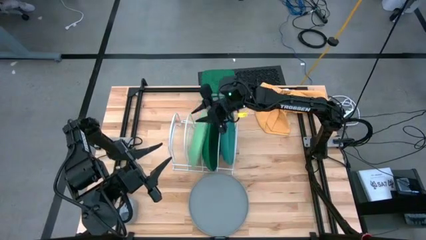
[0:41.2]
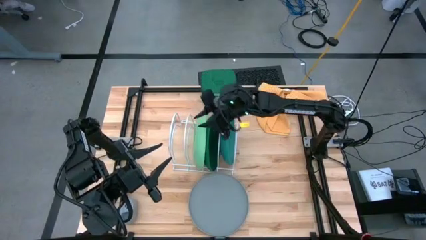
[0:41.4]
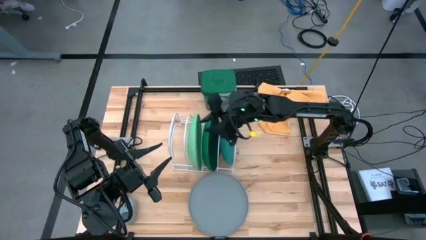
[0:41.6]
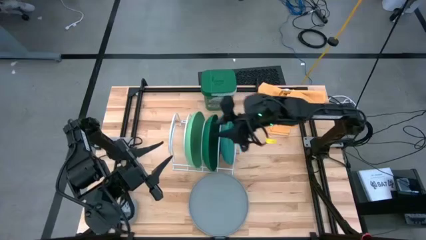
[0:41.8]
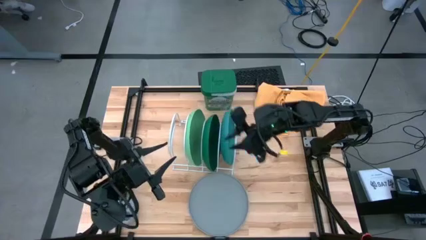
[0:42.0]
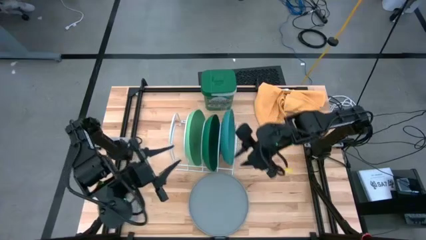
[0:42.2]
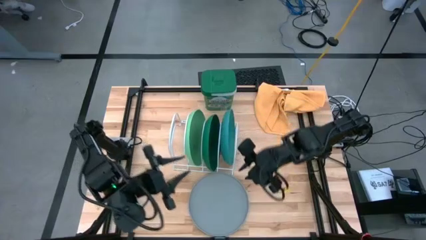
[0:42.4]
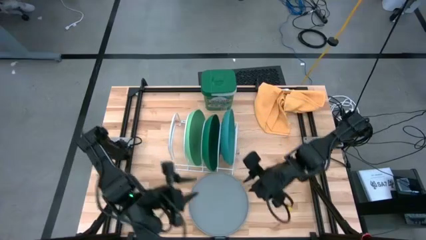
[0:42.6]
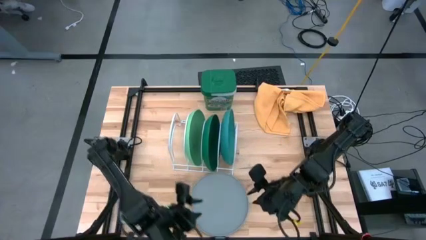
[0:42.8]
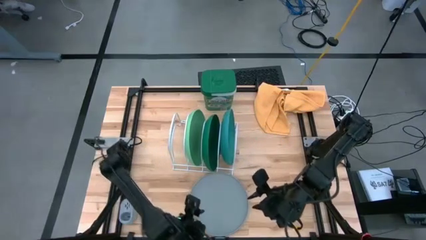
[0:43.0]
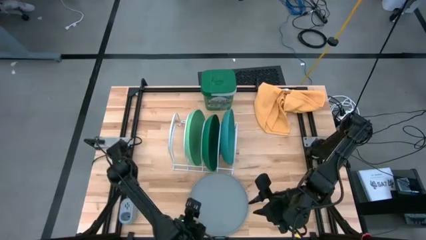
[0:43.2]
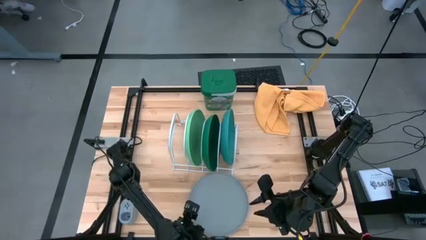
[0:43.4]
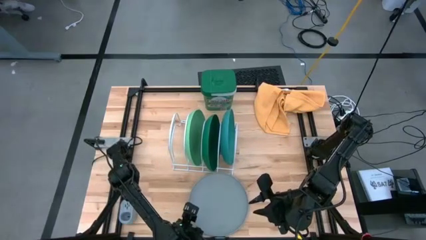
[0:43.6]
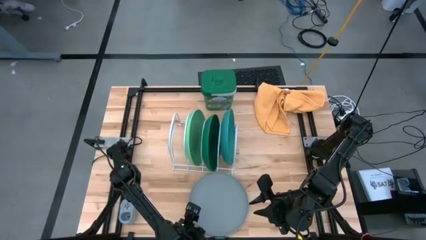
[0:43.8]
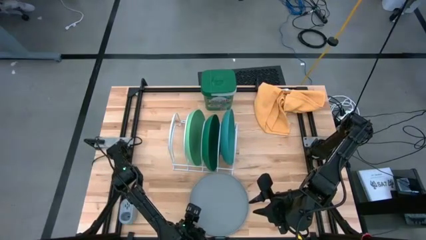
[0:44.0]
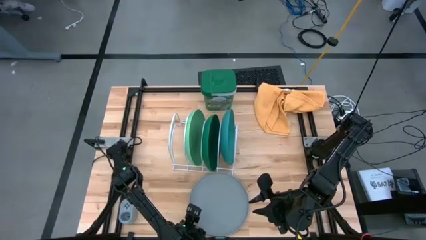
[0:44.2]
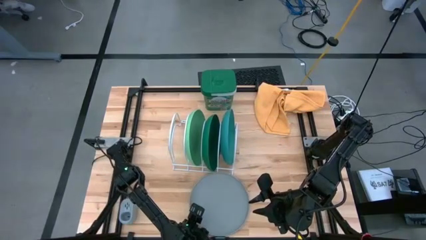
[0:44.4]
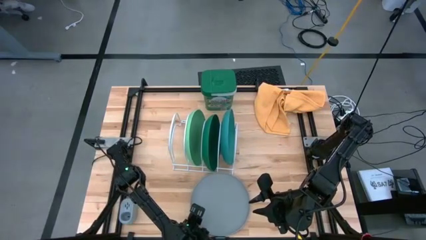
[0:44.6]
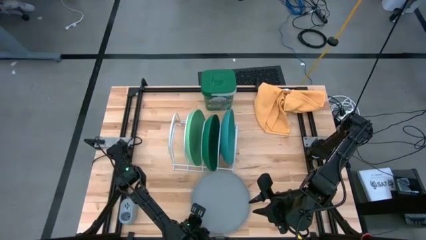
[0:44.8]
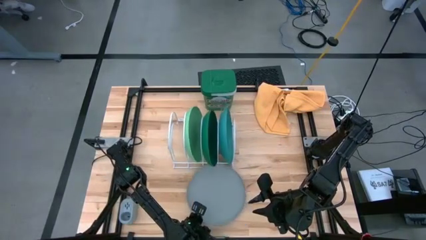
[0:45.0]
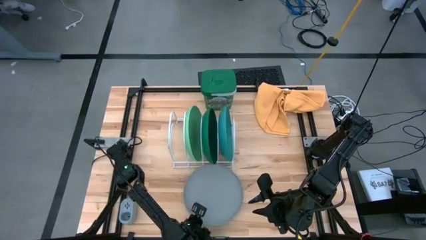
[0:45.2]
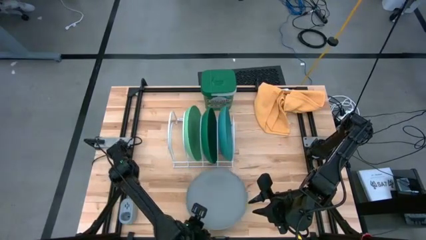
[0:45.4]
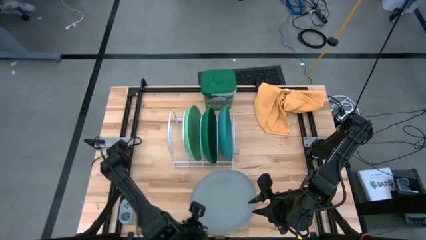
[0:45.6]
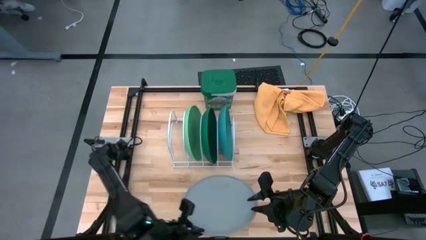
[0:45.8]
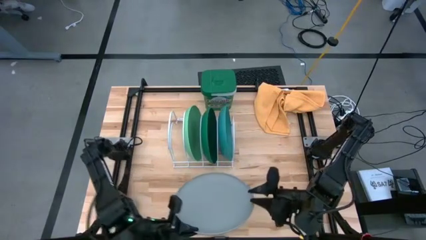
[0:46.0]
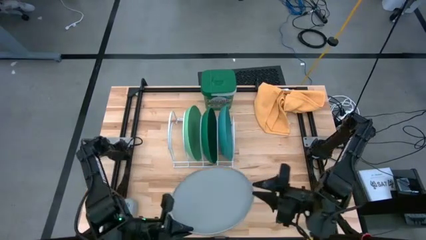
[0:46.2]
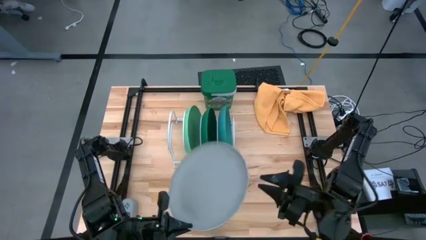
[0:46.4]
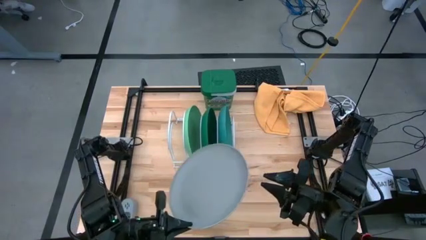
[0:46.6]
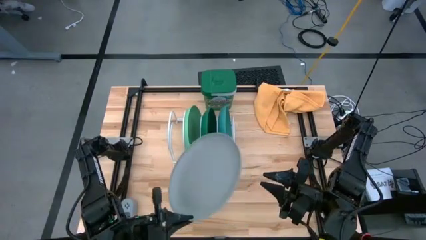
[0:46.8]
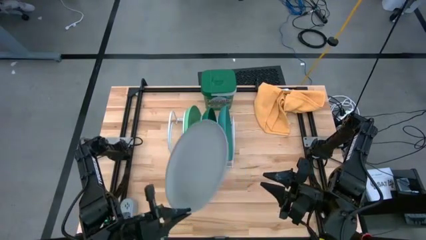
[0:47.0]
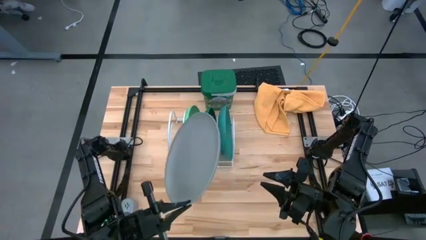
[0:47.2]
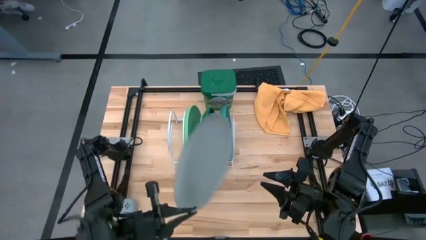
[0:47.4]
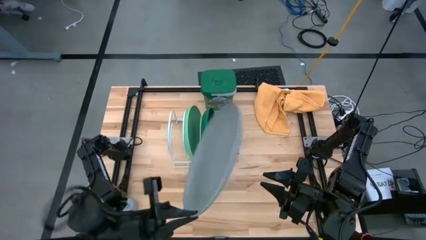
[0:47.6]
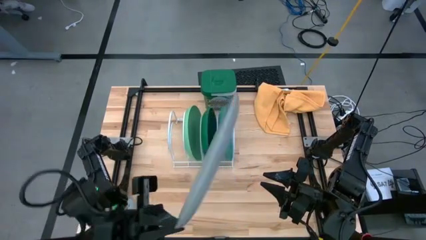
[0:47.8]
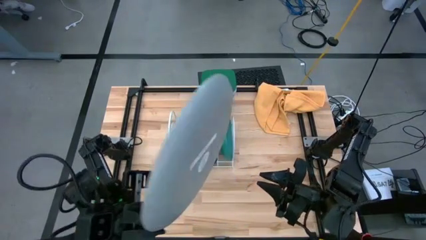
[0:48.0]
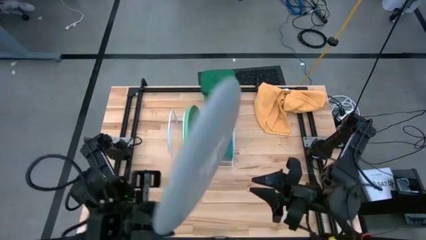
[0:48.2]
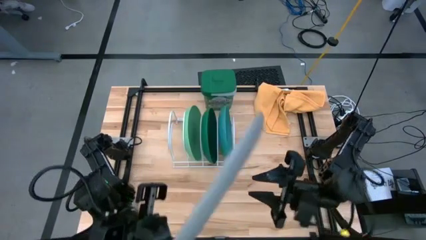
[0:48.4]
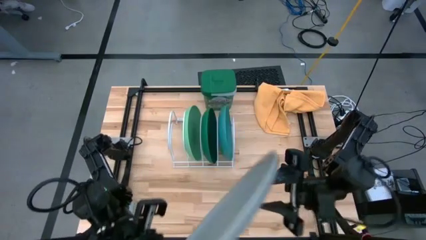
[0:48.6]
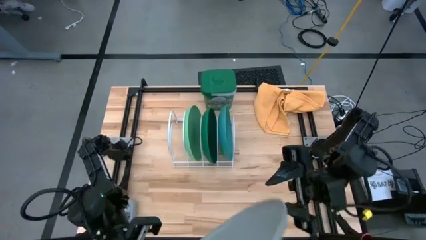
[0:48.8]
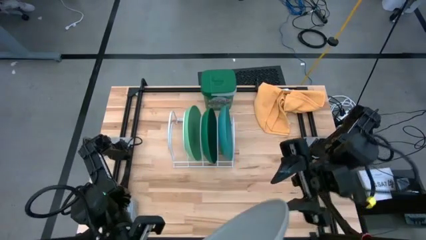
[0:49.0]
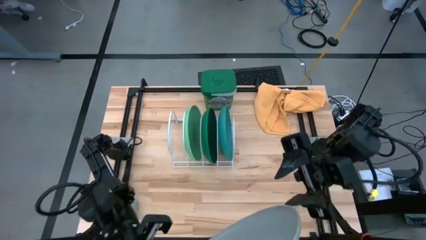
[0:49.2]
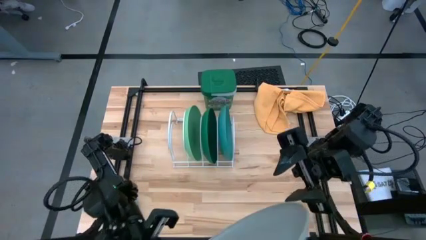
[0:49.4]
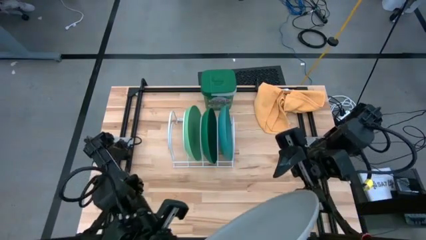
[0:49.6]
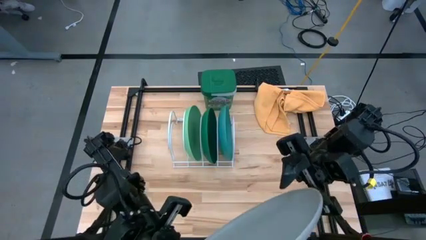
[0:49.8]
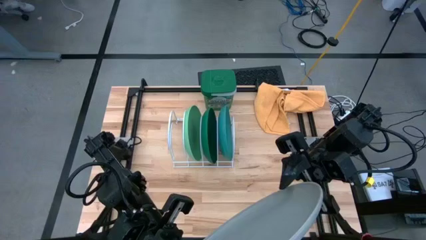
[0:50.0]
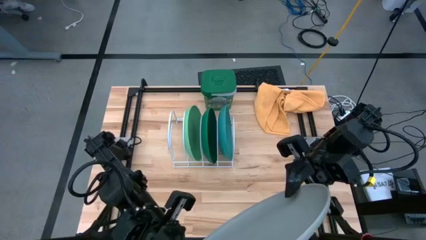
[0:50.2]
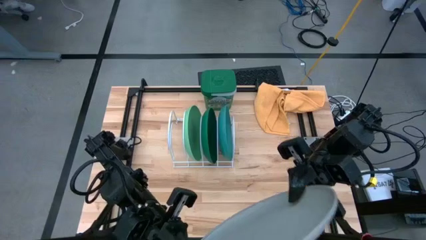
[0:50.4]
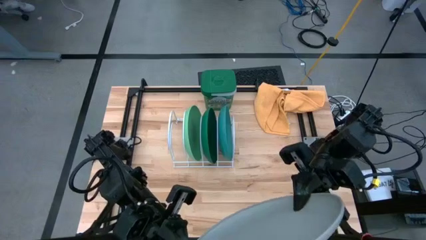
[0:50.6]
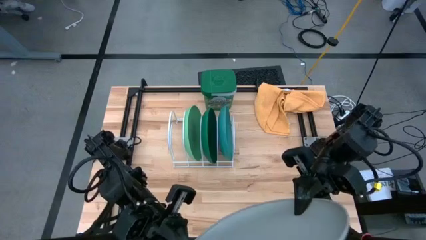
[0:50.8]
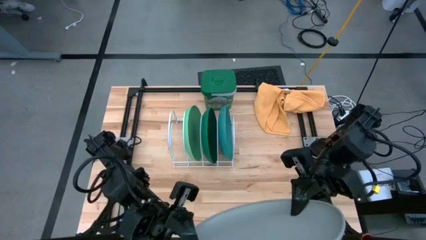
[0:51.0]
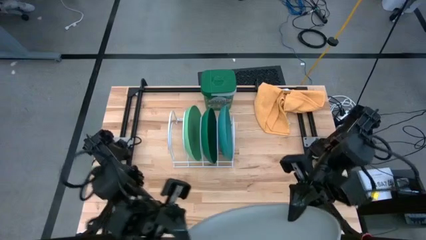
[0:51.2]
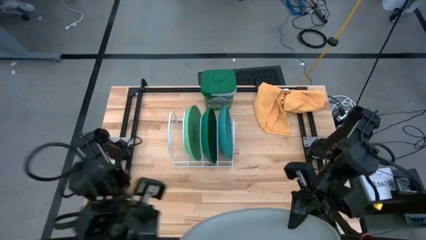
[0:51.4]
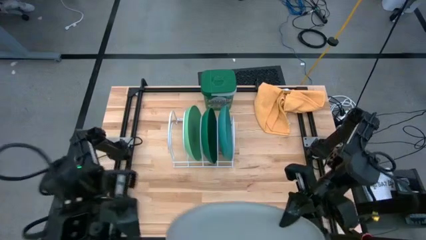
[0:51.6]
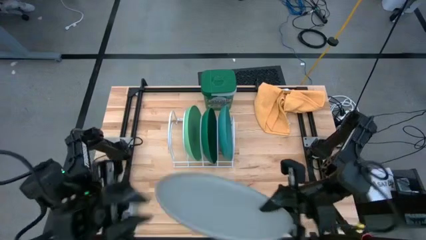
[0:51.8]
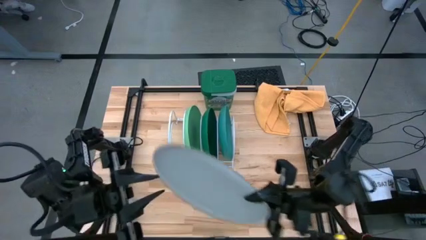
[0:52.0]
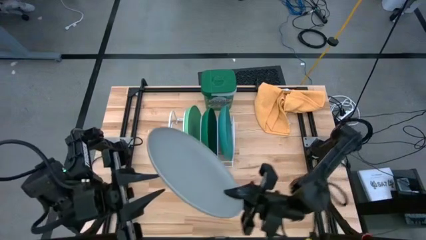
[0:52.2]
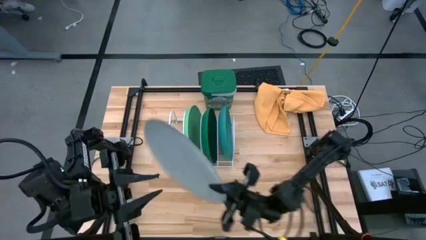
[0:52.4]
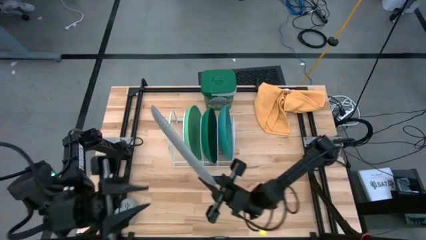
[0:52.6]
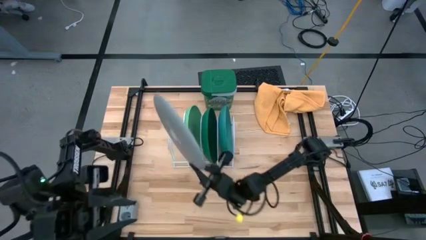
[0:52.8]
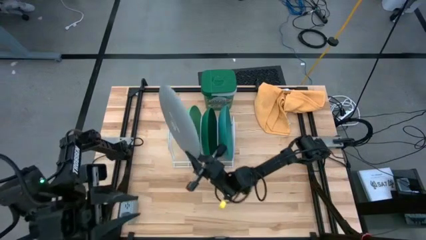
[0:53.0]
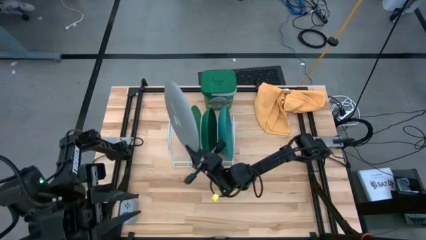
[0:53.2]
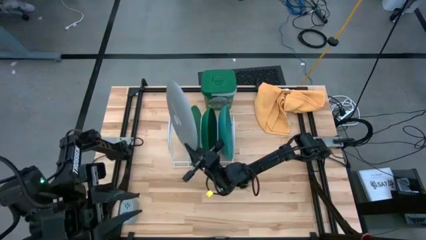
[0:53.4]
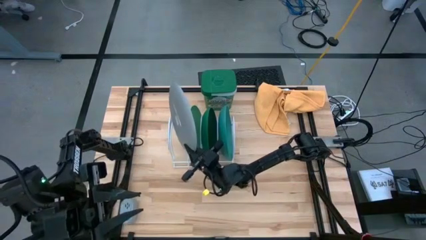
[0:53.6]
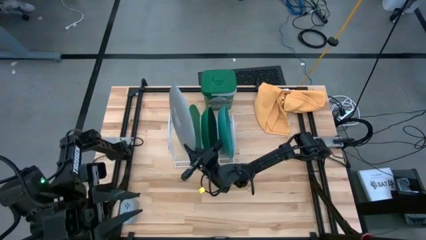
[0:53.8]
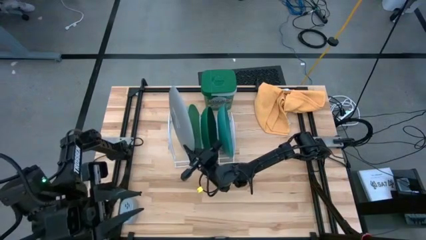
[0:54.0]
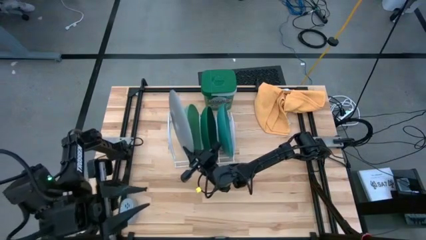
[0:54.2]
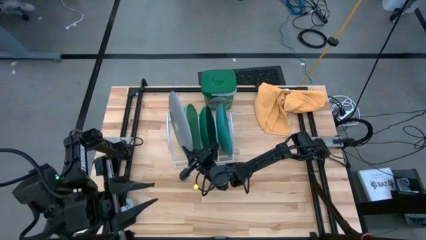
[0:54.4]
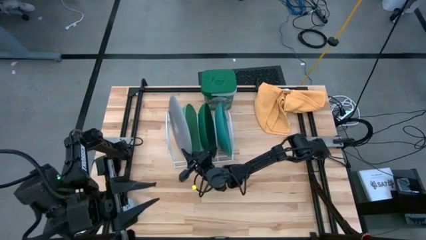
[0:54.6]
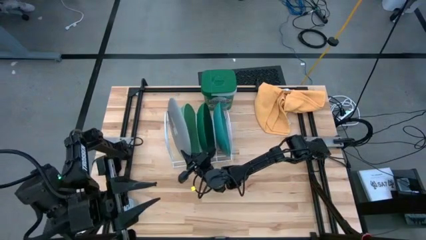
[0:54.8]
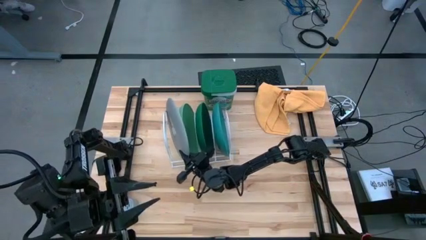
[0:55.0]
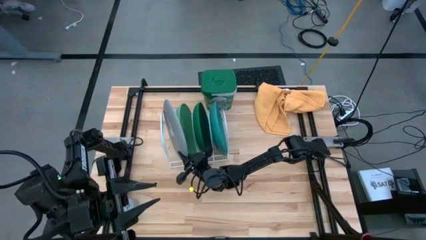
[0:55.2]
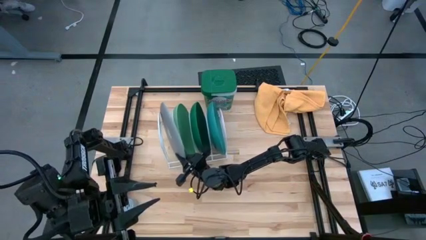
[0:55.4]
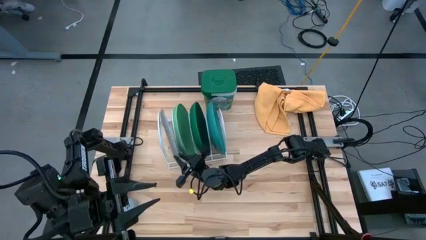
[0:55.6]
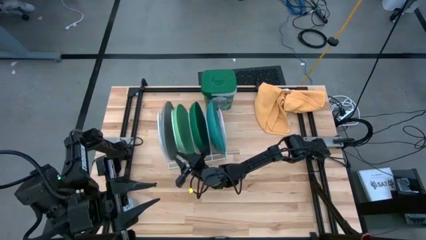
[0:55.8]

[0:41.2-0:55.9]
Task: Sort dishes
Put the gray plate into the dish rack

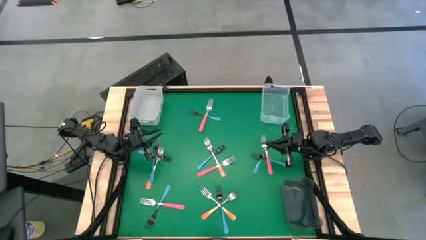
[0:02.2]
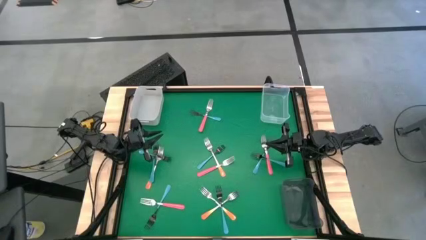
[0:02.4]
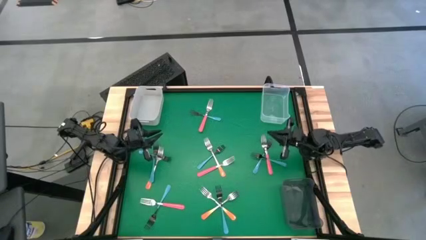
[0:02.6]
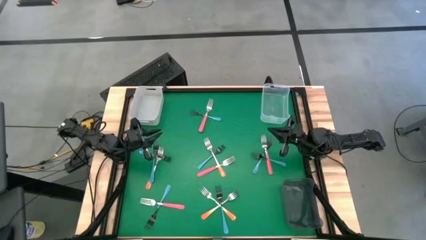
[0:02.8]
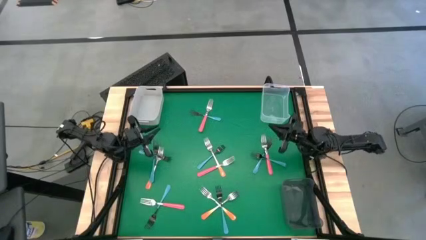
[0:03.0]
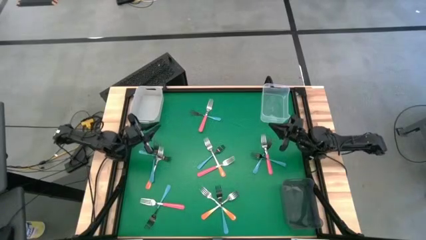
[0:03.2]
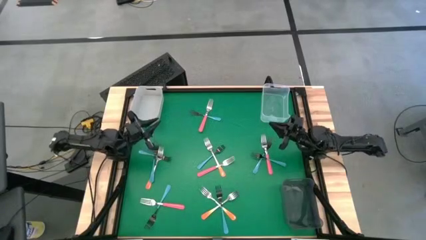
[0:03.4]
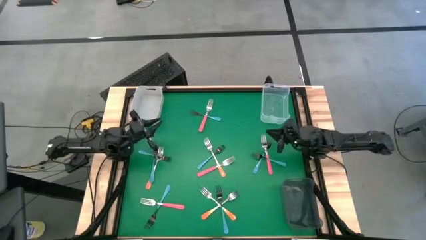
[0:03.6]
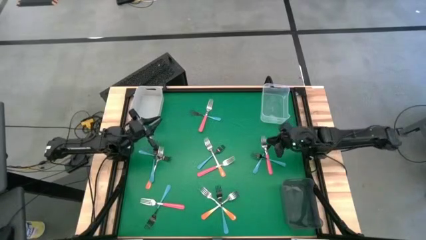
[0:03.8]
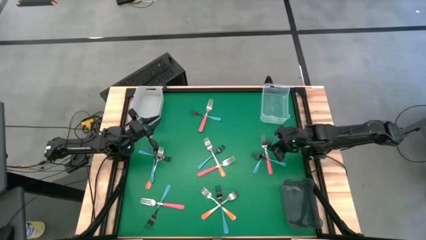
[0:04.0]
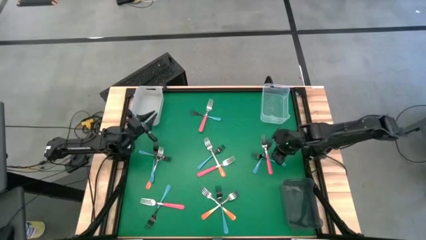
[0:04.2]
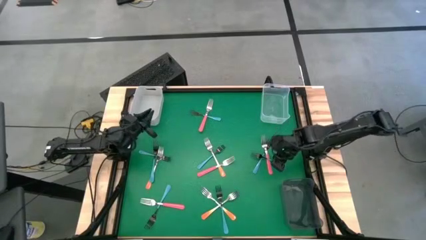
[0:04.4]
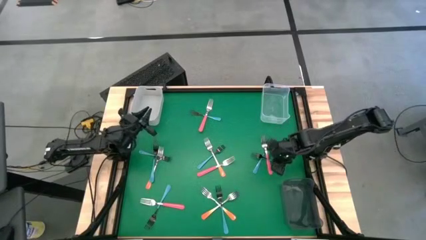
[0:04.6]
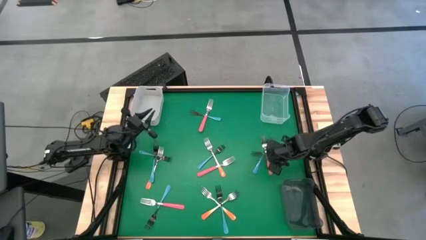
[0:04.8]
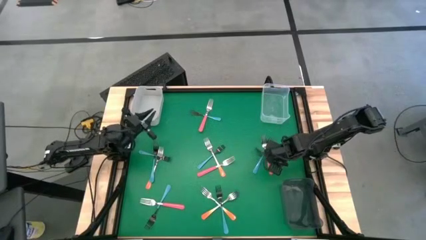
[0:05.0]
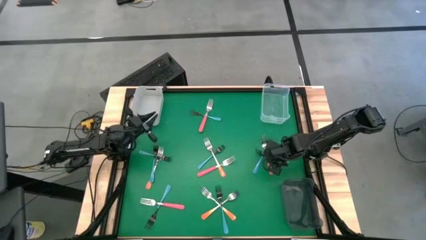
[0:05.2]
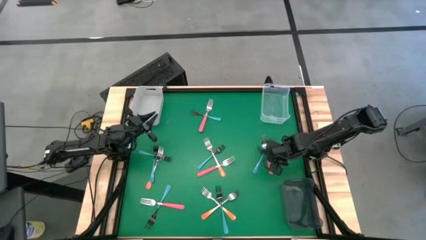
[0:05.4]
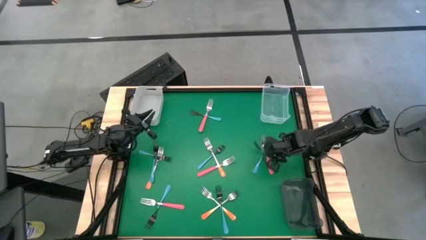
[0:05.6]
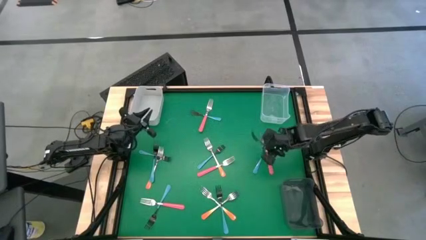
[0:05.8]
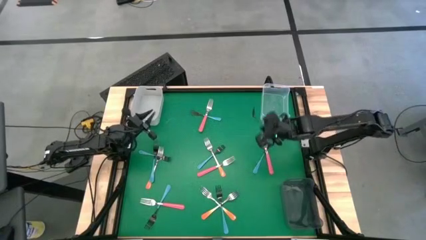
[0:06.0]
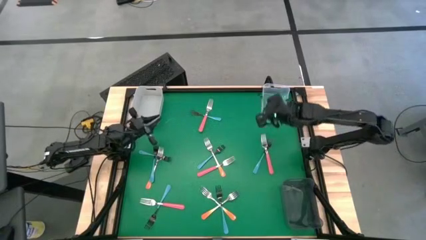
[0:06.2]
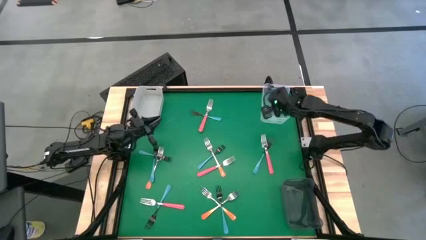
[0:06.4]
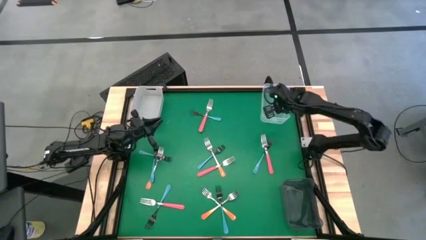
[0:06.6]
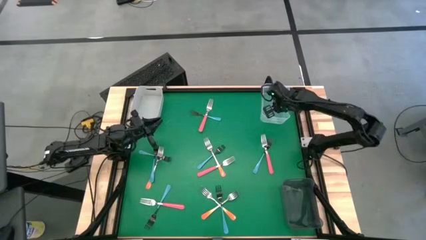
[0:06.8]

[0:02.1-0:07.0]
Task: Sort silverware by color (type)
Put the blue fork into the transparent bin
